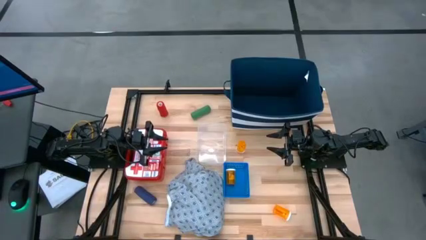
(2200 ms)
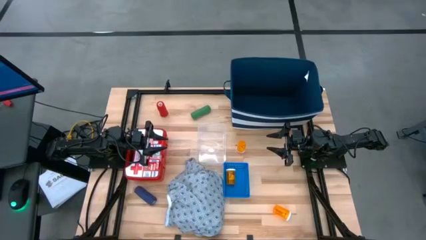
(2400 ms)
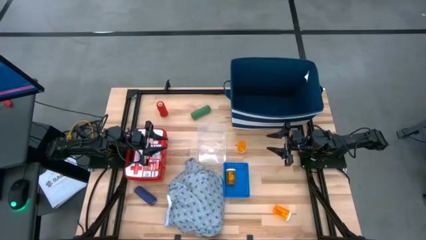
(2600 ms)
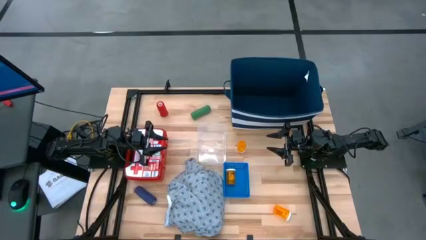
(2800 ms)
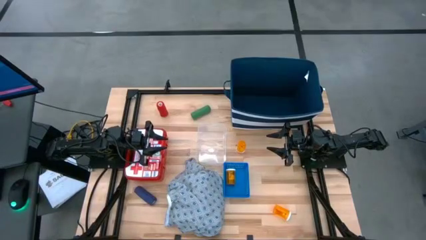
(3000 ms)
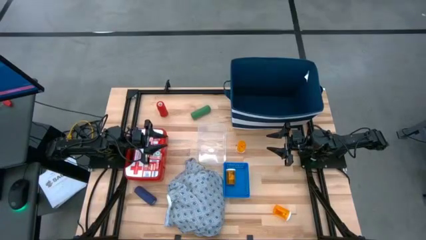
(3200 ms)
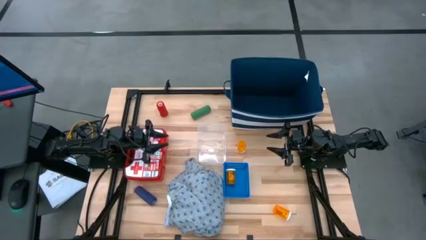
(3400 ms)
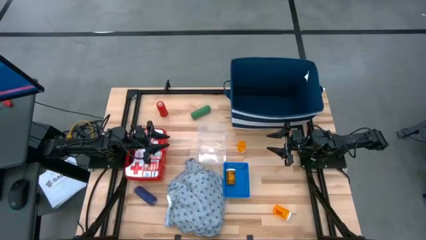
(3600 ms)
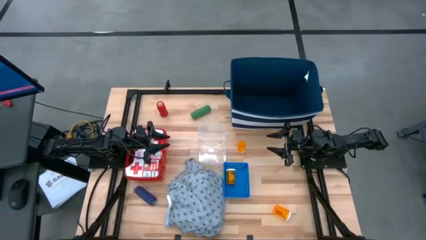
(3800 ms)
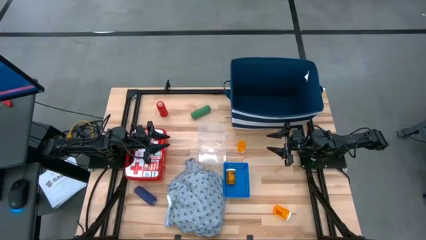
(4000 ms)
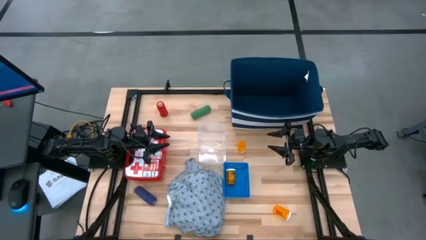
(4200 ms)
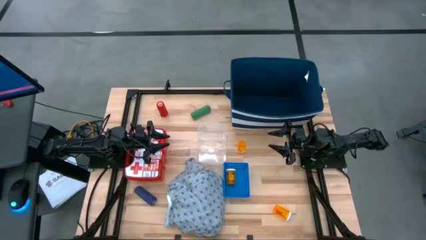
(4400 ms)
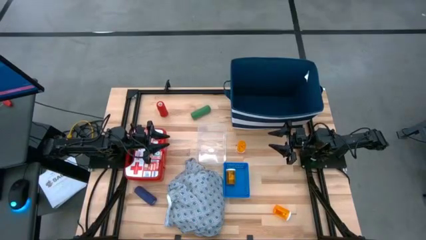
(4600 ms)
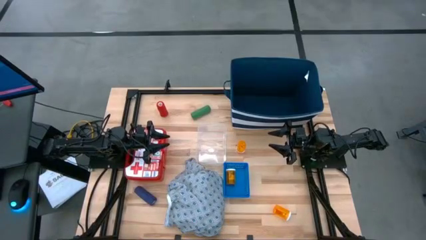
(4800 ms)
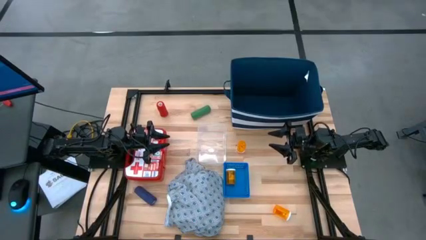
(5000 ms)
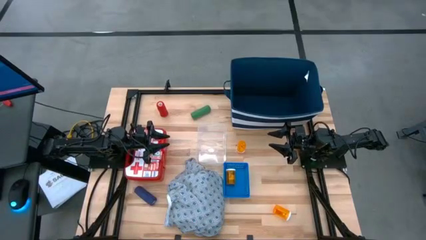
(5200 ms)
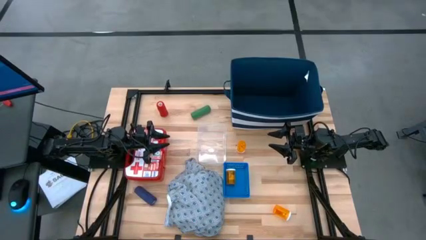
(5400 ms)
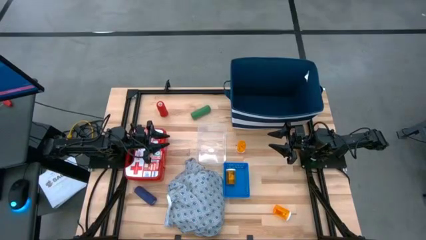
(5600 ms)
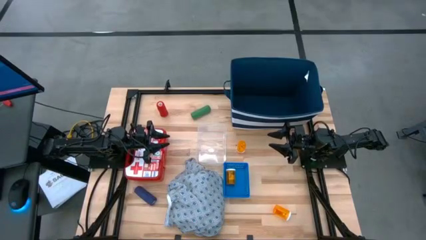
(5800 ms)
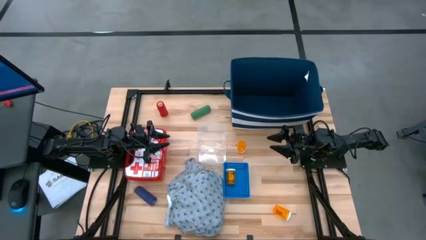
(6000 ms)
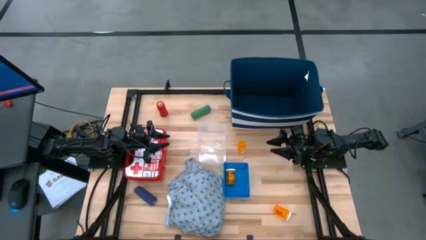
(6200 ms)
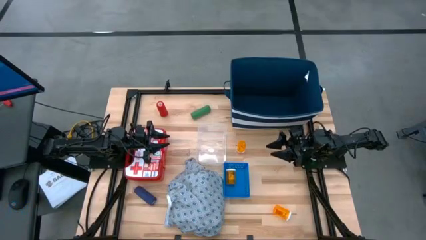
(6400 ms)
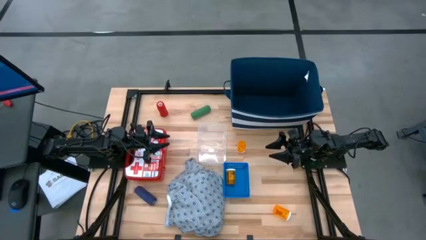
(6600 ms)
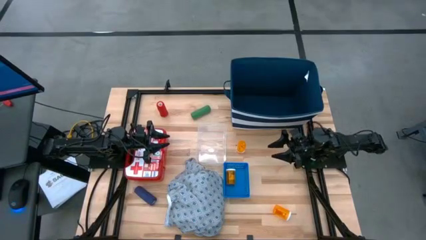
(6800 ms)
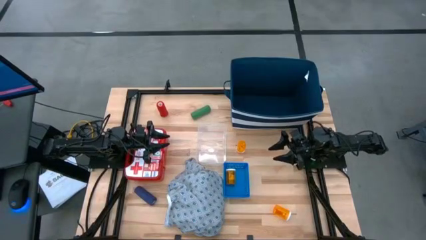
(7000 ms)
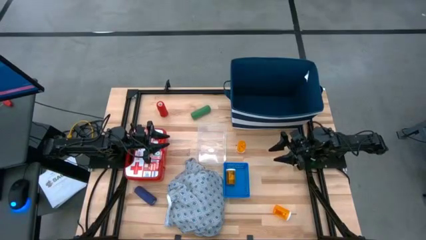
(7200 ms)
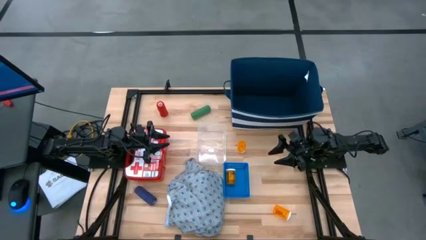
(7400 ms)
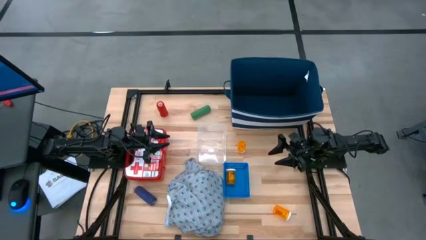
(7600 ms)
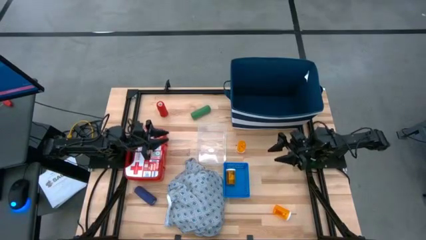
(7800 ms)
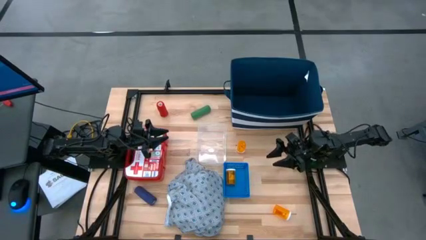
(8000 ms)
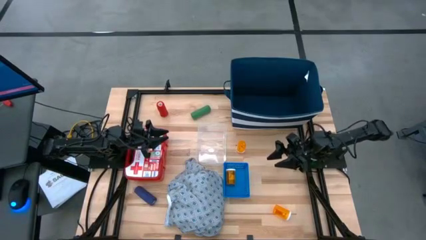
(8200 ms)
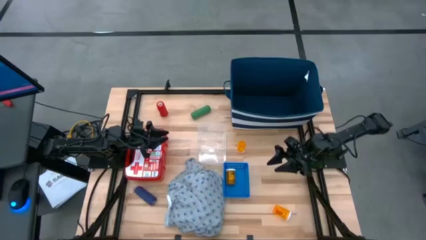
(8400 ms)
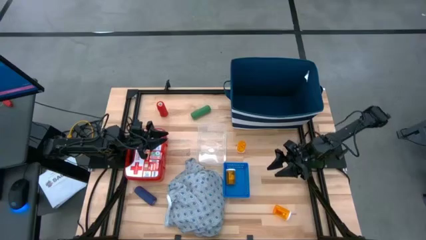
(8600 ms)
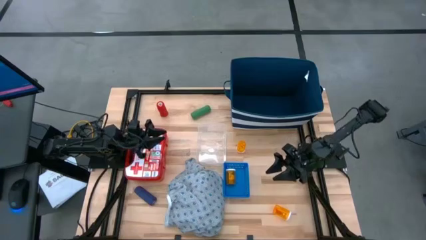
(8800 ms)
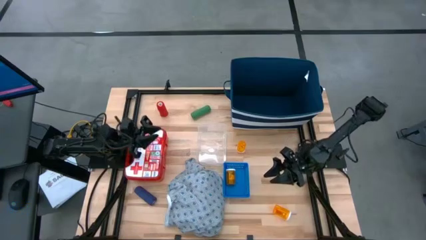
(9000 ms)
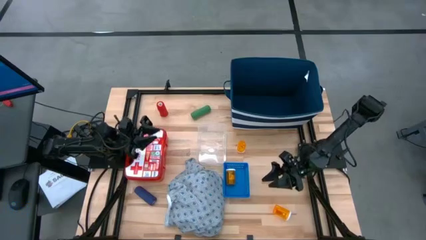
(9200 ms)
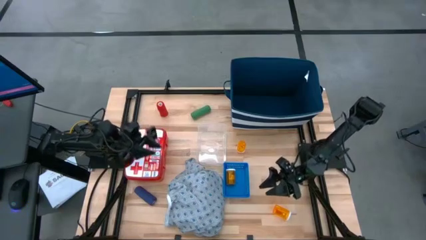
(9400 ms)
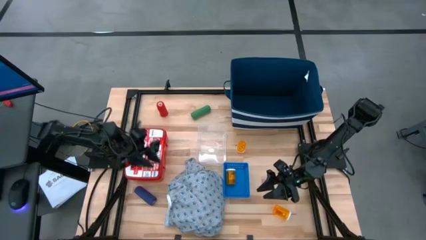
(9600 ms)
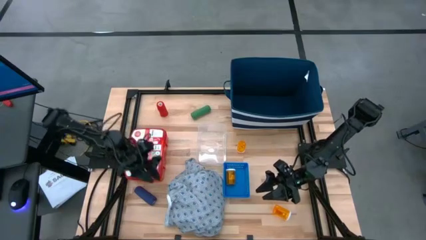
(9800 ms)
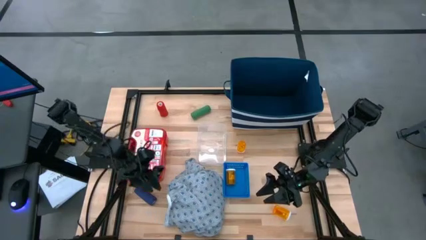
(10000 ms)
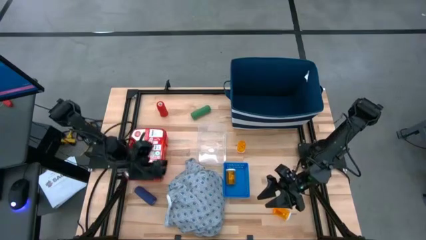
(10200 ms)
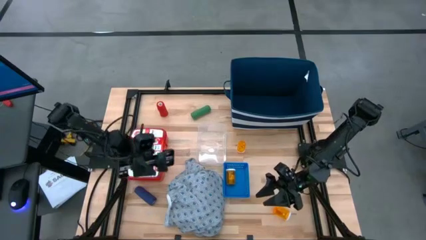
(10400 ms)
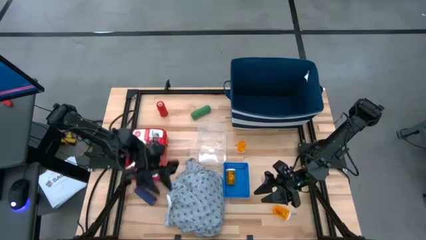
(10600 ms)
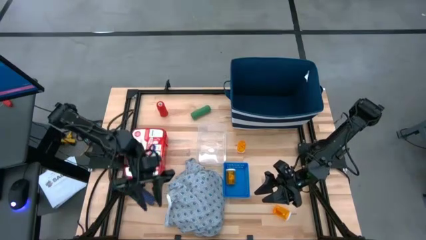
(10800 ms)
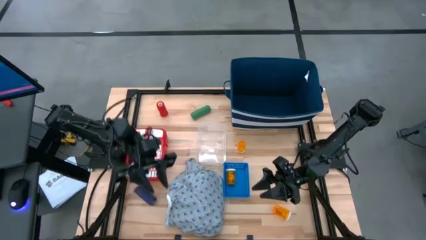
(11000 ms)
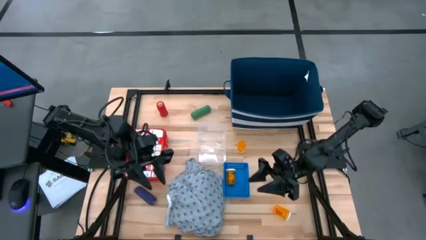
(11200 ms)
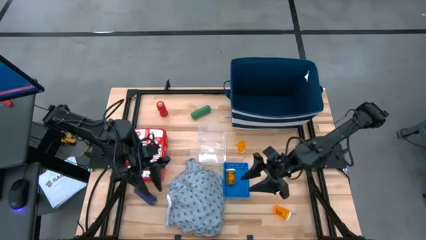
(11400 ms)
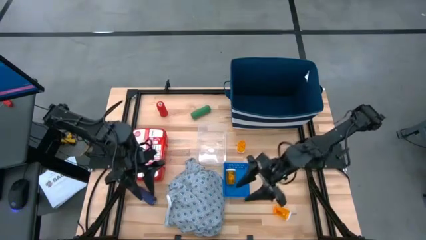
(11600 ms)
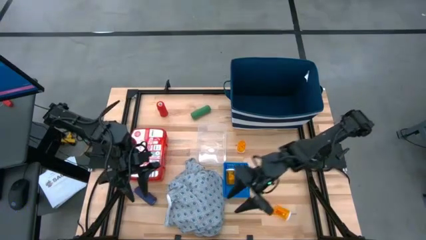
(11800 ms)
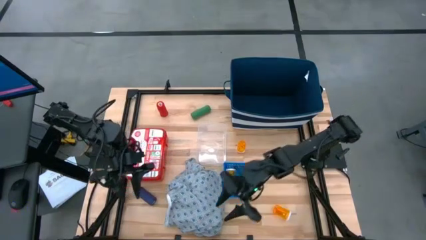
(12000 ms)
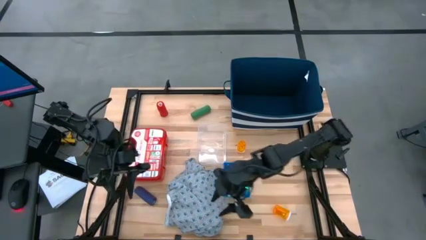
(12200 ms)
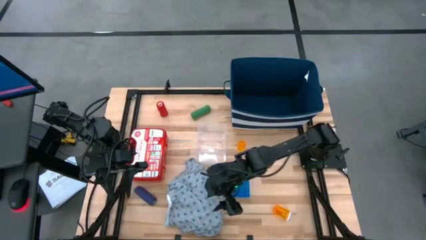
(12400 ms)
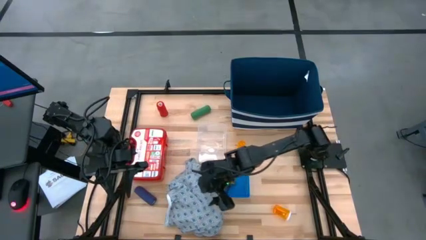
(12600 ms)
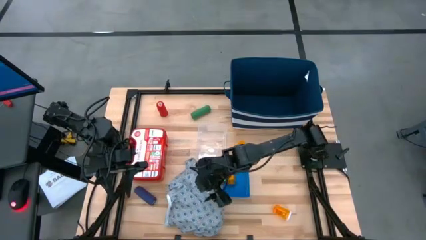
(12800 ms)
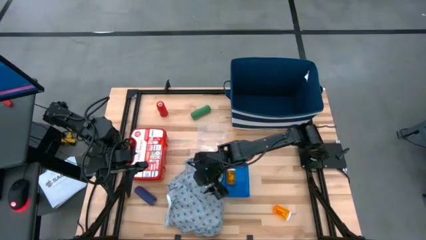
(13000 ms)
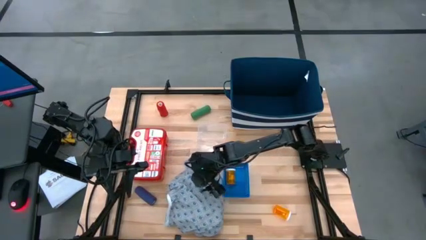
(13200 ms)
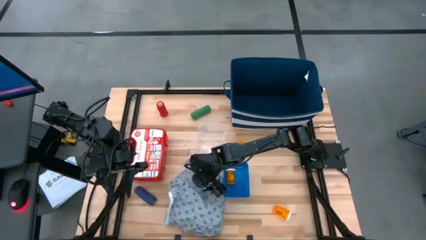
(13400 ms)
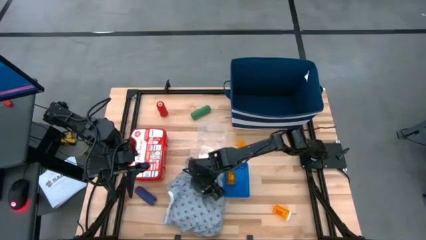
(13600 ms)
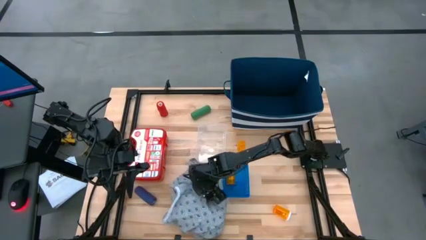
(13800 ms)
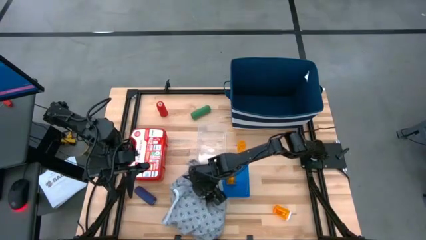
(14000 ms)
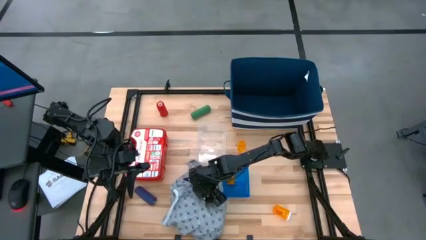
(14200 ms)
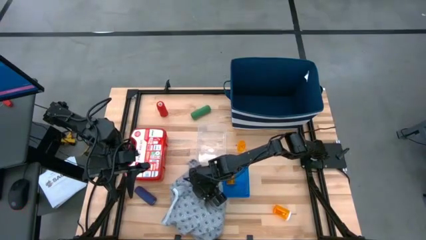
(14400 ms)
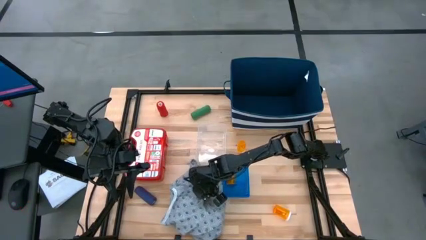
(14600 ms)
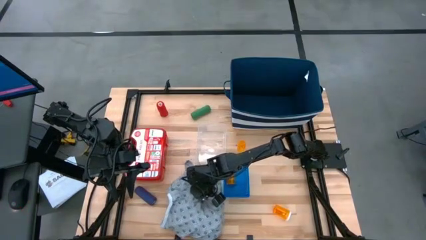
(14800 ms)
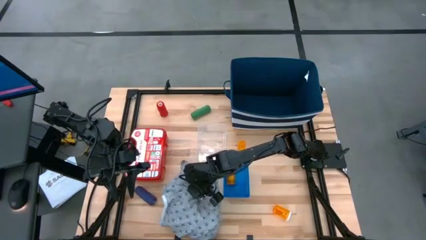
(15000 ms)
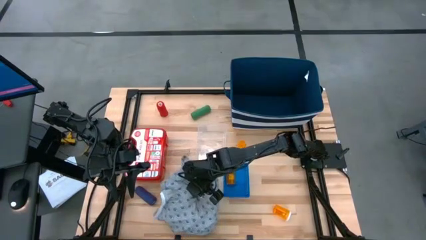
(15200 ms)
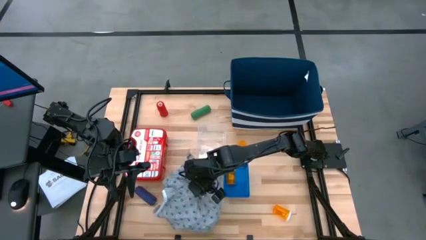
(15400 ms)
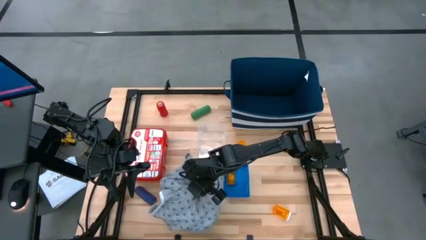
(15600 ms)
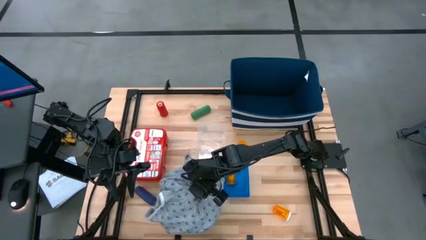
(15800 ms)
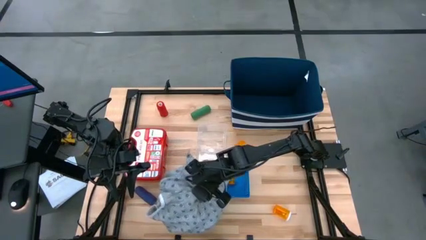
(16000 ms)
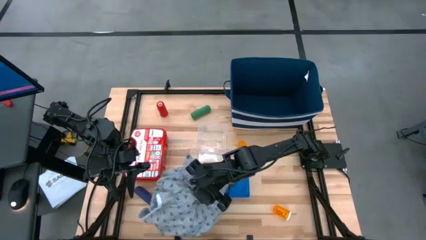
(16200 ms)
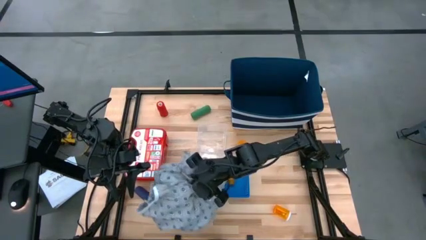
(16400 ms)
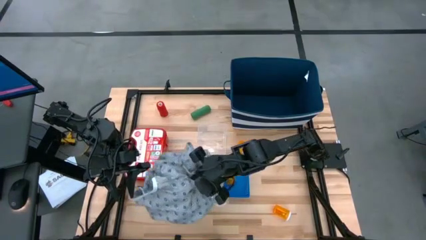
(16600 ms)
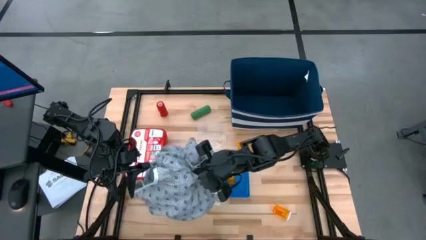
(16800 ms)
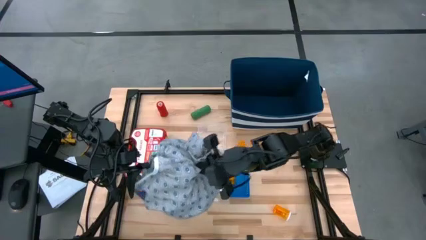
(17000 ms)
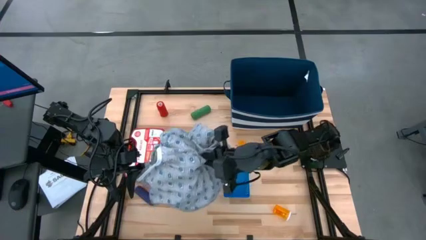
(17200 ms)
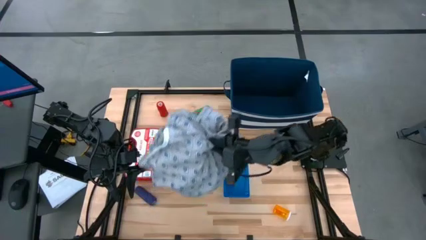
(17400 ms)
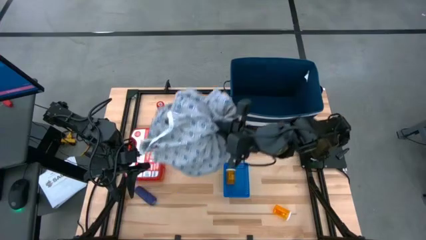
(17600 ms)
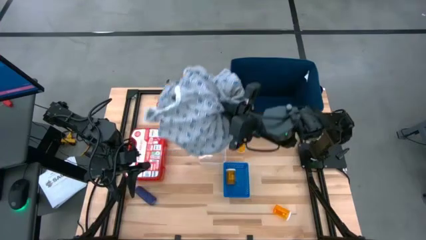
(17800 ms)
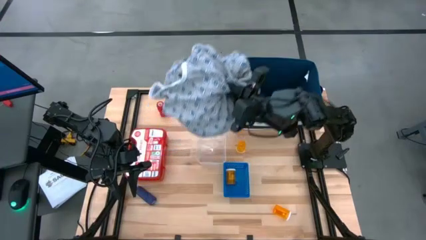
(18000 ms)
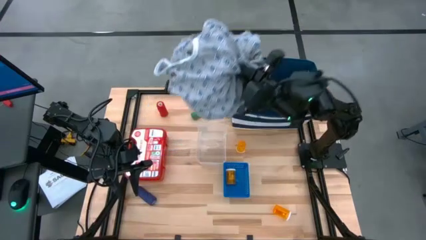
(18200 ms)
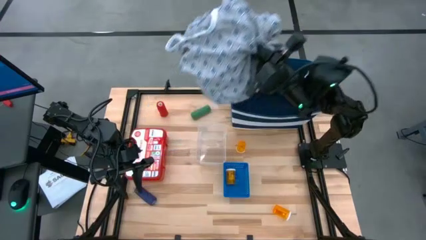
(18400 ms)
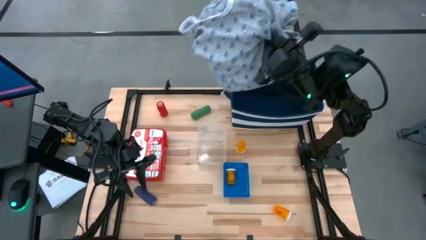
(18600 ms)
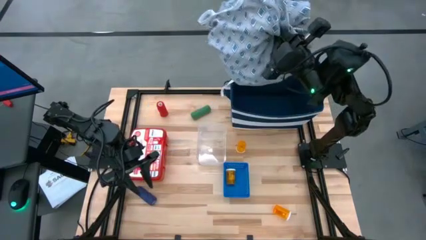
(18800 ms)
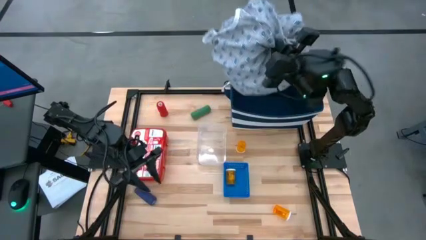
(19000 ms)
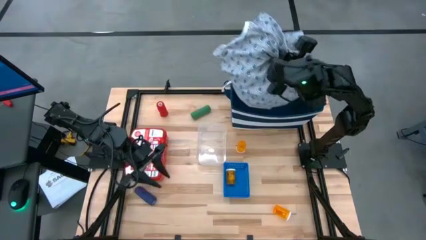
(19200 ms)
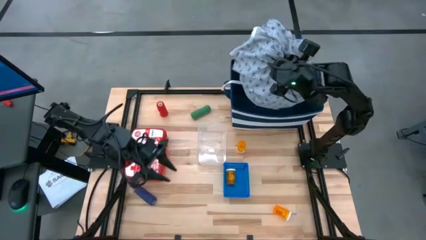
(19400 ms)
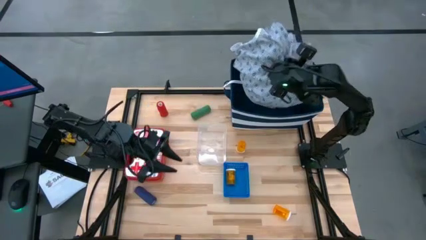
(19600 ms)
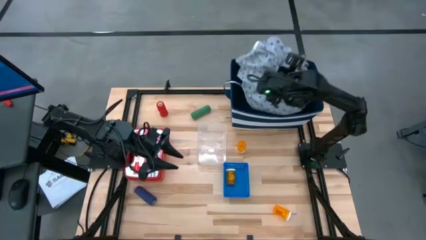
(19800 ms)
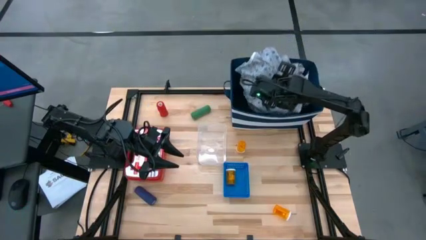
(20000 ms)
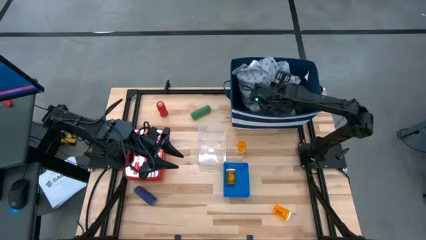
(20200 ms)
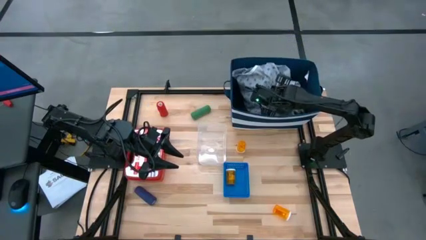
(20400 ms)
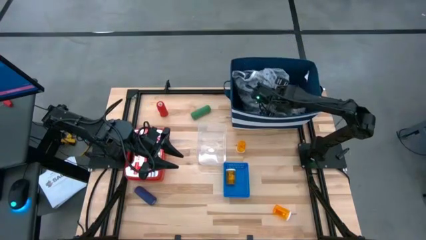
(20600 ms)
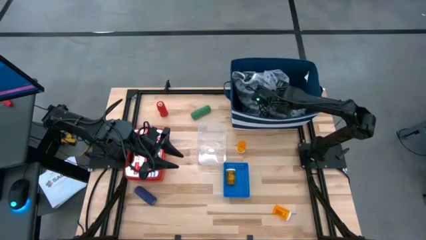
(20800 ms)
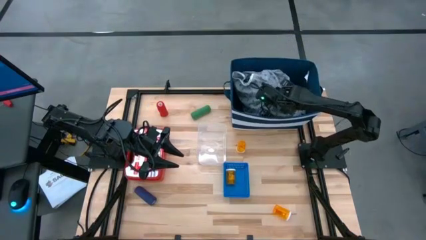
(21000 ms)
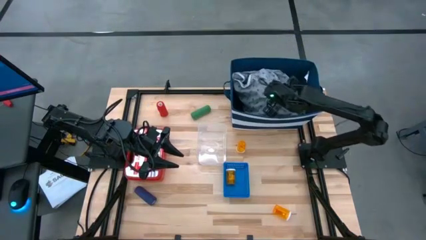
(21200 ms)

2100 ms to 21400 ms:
Task: Pick & Place Medicine items
Put the blue patient into the blue laundry bin
